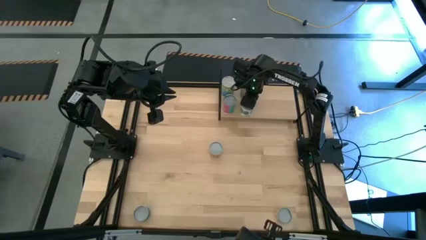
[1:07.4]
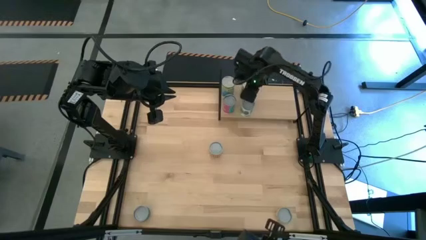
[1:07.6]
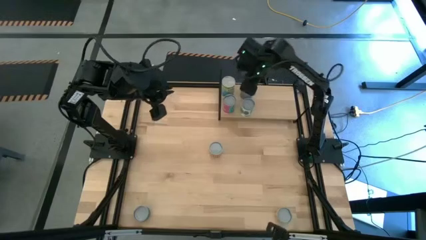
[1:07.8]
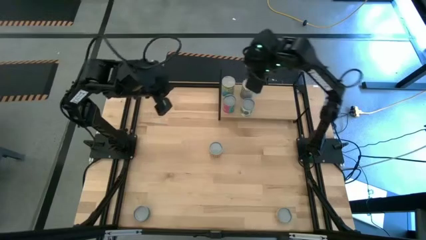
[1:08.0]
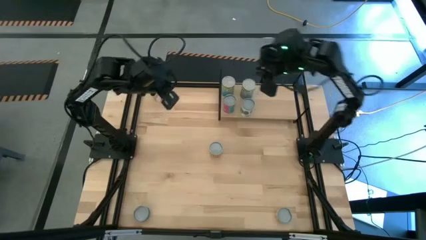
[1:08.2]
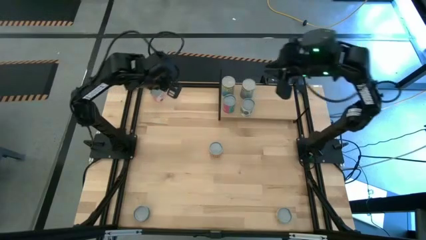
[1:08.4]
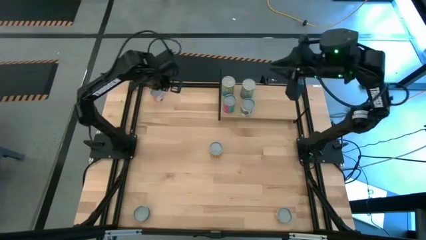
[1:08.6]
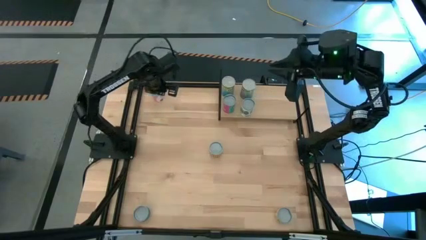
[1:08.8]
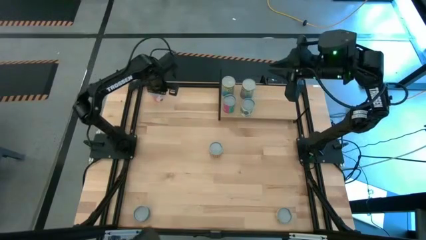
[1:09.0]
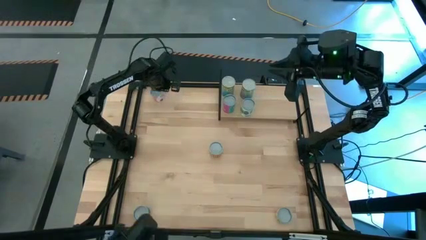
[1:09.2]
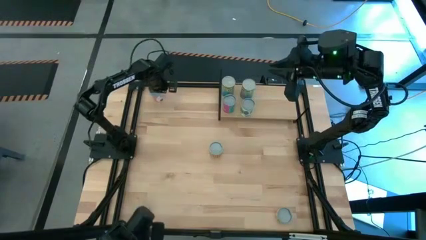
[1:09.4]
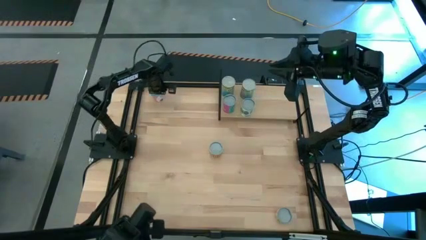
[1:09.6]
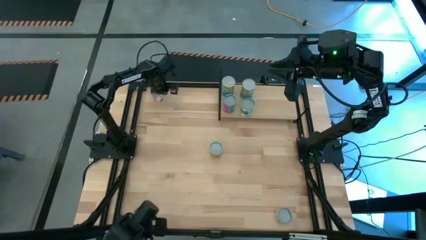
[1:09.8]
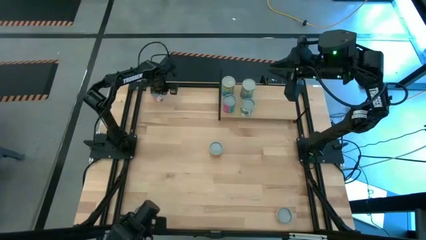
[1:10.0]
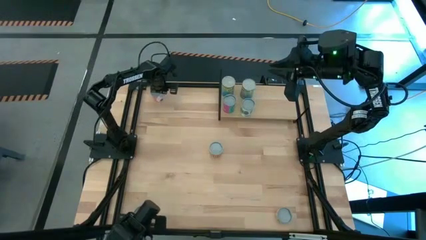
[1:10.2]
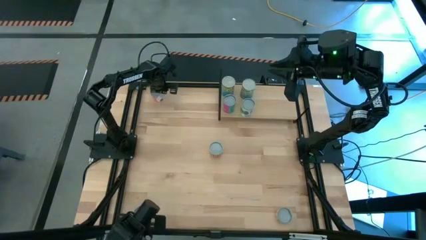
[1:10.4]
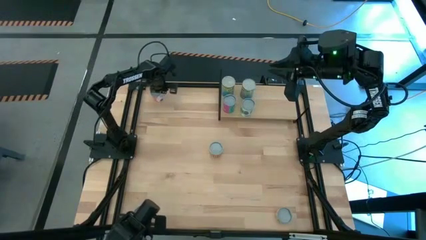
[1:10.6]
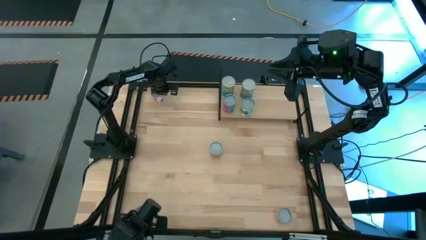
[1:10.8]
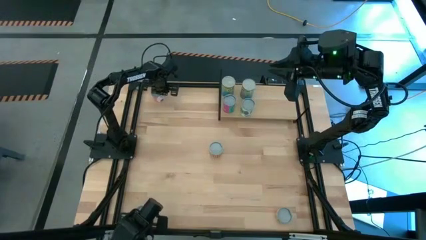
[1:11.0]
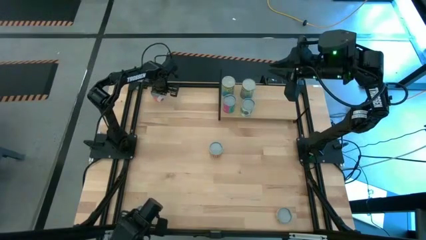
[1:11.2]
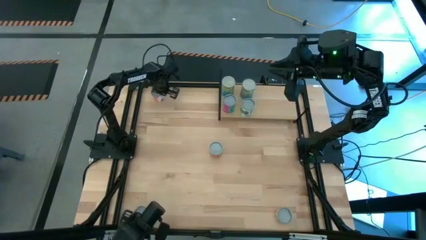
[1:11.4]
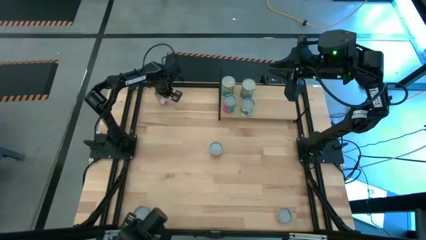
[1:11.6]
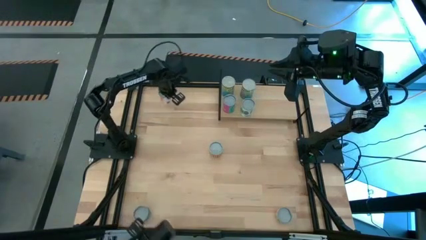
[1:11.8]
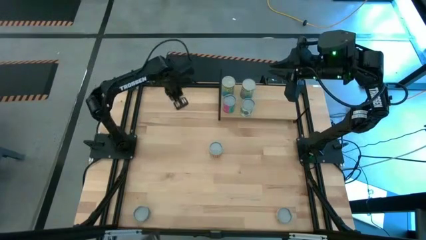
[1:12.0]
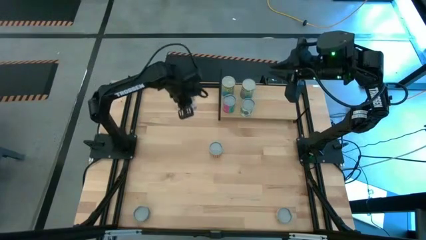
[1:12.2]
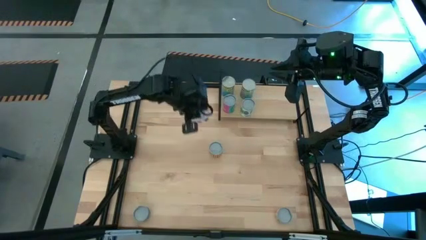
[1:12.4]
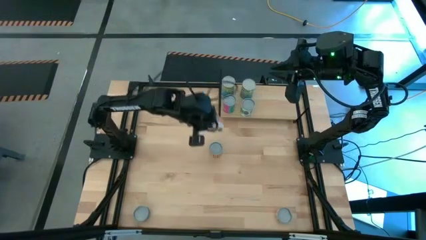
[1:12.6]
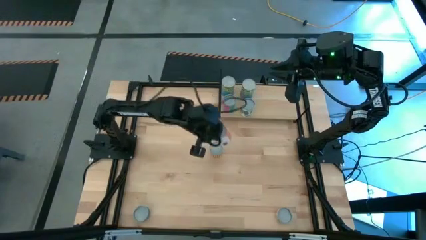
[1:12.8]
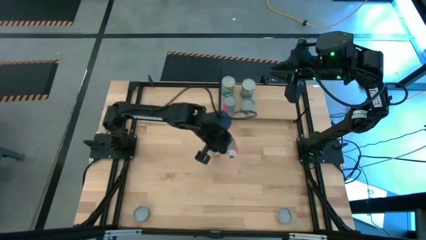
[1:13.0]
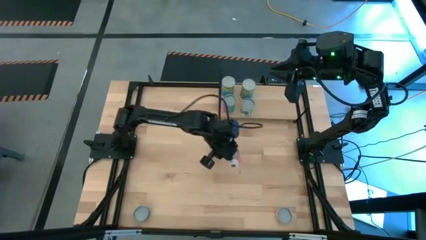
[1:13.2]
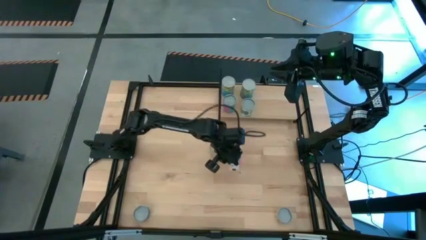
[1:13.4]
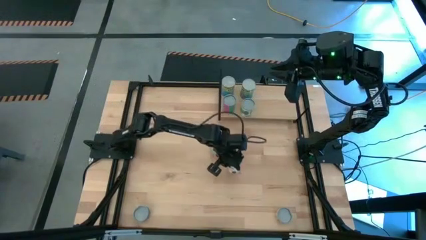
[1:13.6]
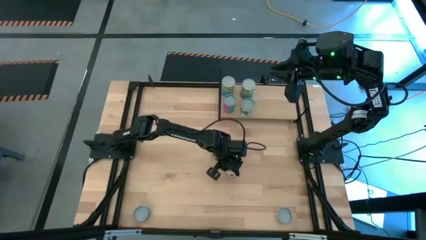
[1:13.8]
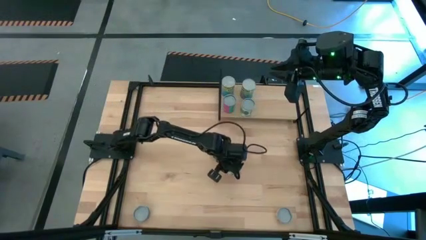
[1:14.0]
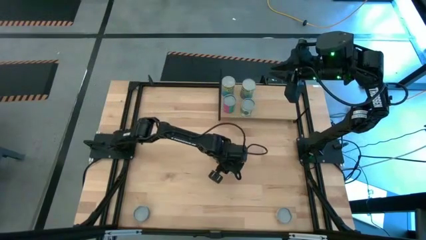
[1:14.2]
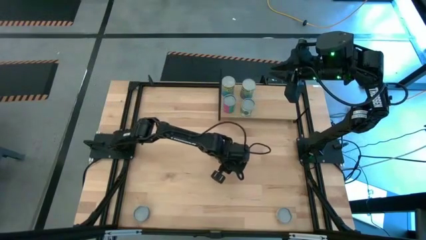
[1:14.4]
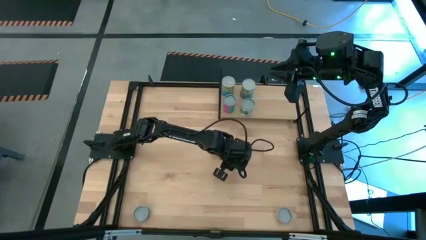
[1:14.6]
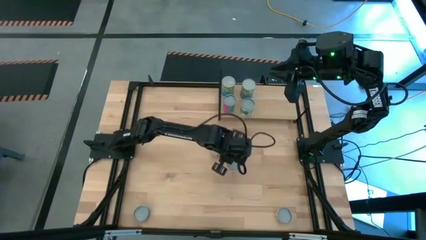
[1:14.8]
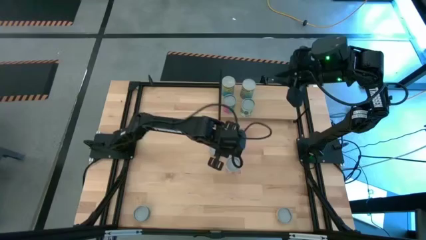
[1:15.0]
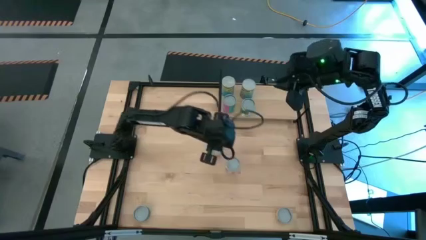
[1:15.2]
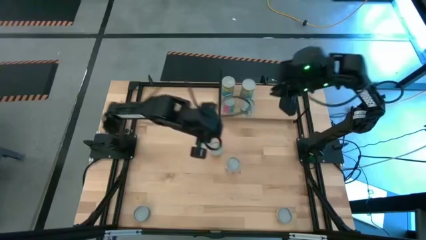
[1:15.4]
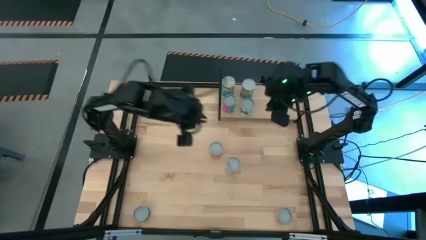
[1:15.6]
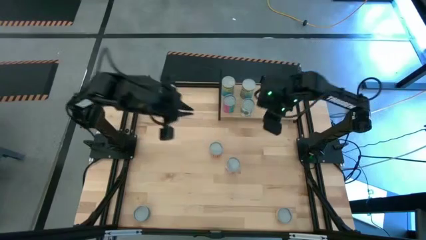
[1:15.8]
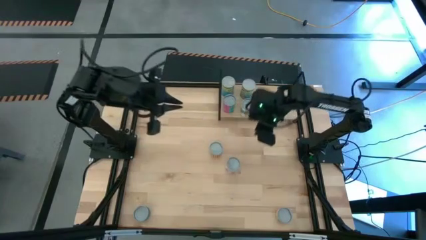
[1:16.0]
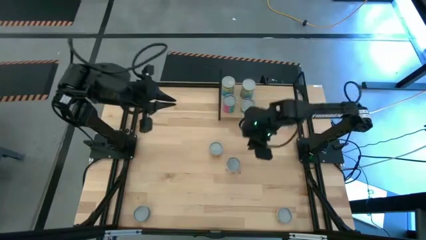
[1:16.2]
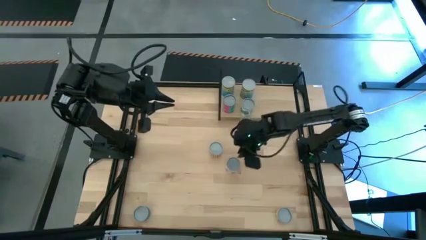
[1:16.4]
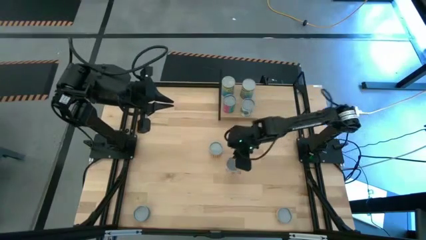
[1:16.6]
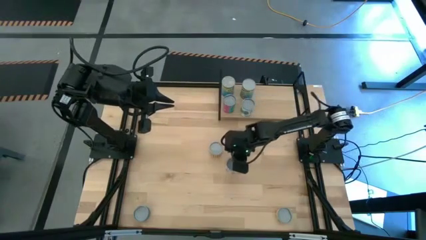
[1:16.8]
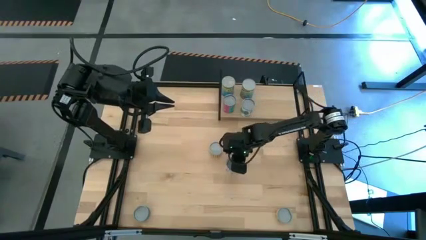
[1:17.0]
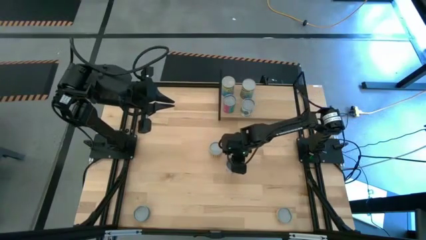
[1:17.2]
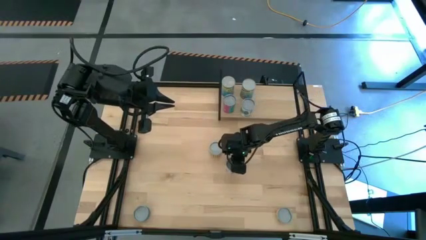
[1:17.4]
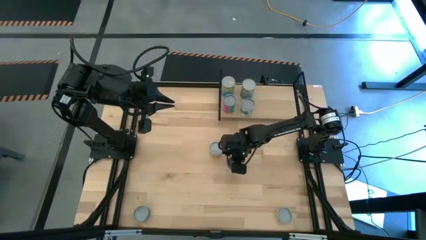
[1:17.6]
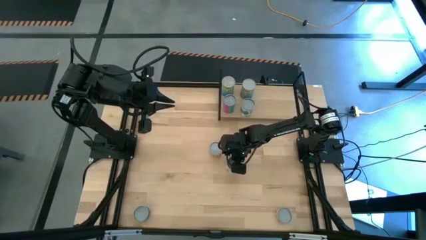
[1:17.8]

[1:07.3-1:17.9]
Task: Pick and place cans onto a shelf
Put the canned saucy meatballs on the shelf

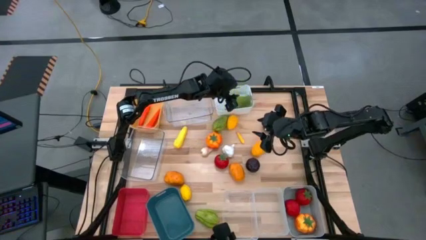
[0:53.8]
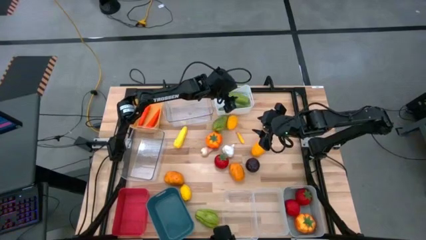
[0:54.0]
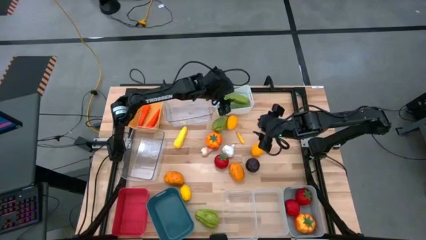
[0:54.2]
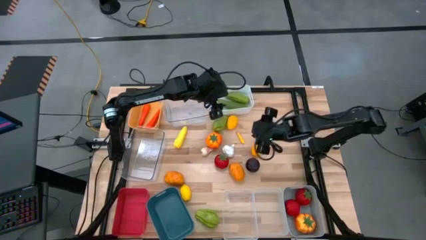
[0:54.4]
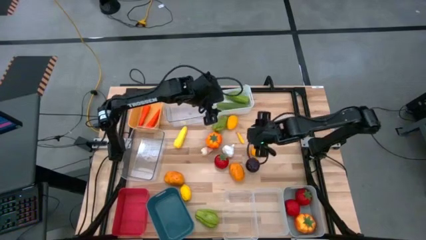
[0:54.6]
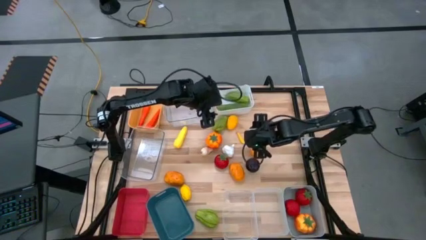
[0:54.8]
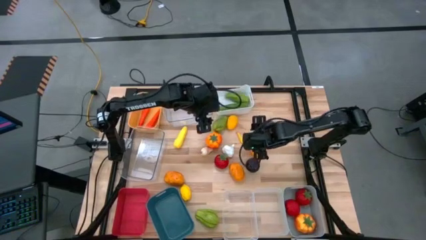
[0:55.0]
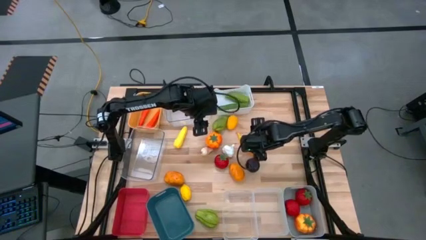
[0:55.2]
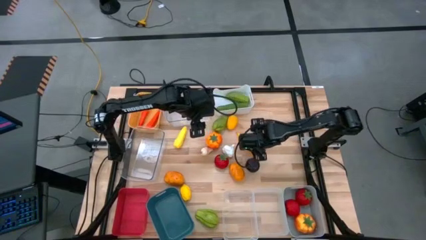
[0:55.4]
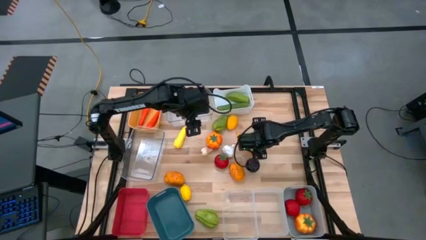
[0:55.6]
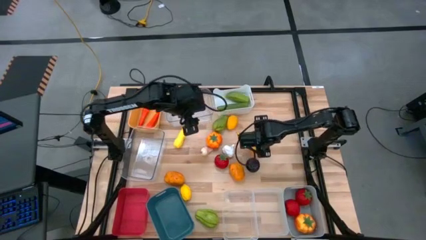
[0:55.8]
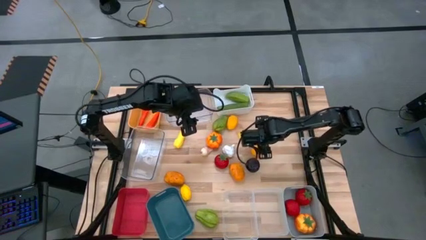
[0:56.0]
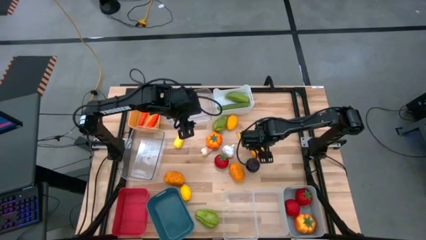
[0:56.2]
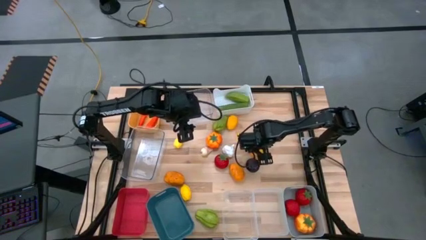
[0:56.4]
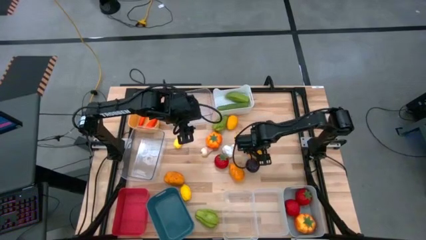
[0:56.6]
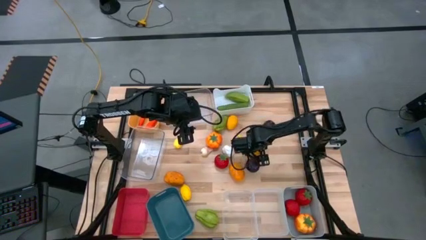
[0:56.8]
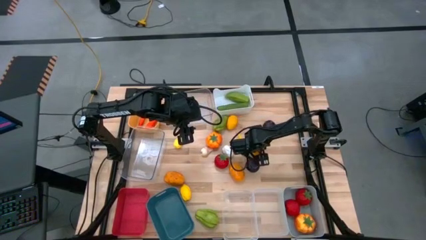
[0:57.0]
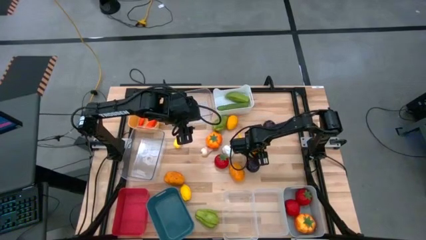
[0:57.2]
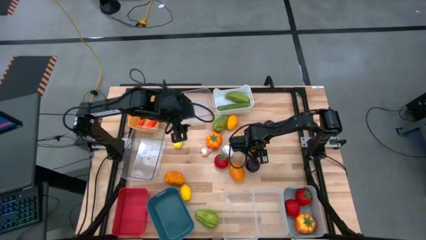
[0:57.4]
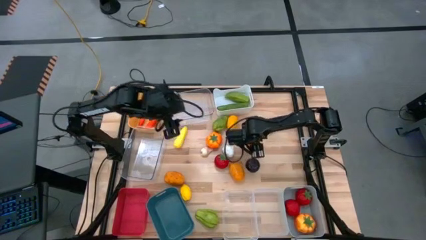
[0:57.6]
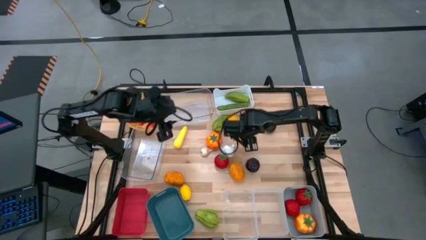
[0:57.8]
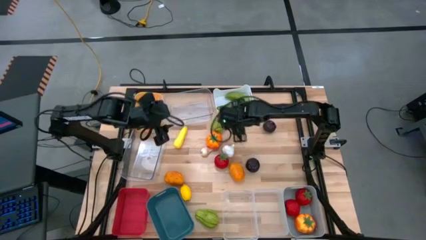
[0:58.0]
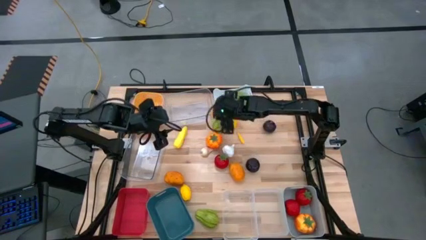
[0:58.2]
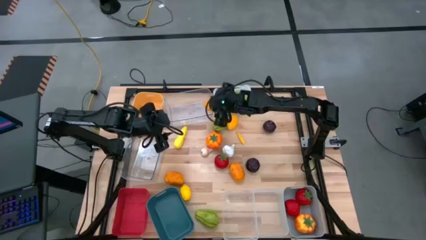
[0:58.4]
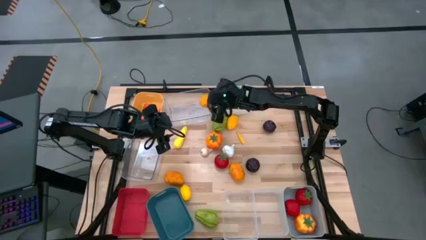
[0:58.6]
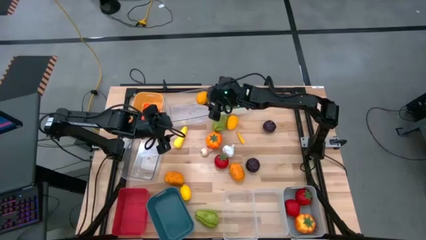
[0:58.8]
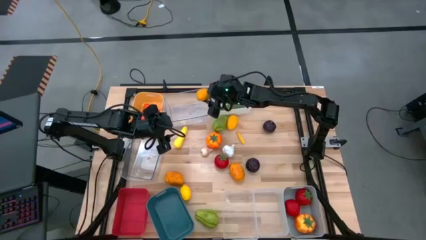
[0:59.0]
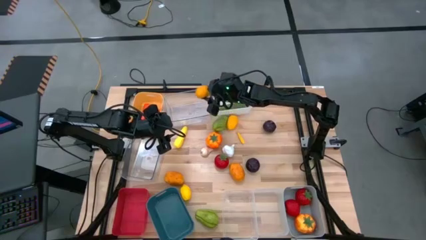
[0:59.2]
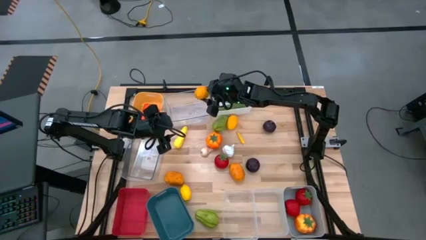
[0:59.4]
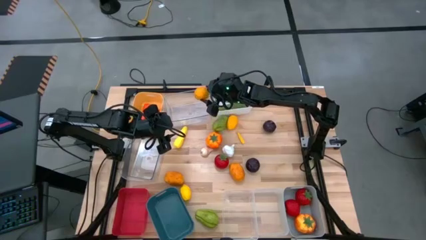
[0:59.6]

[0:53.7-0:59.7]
Task: Sort produce into baskets
Put the middle yellow lemon into the top transparent bin
